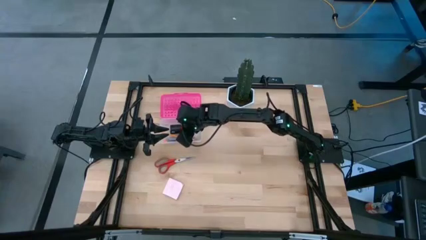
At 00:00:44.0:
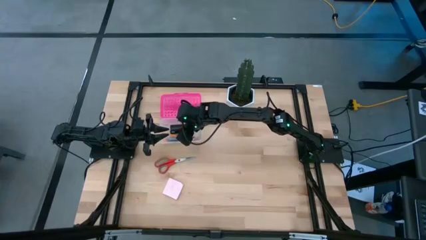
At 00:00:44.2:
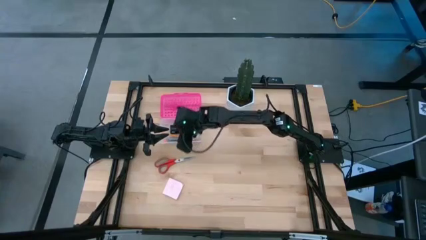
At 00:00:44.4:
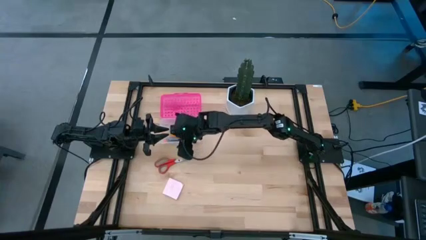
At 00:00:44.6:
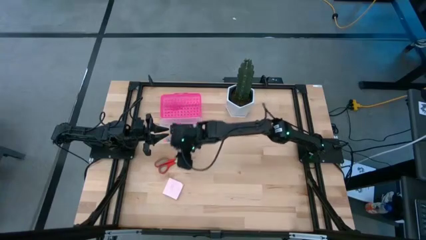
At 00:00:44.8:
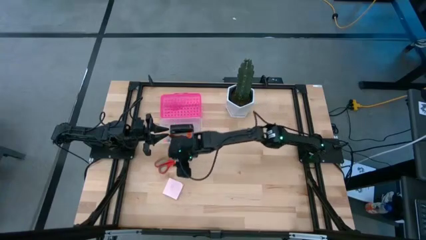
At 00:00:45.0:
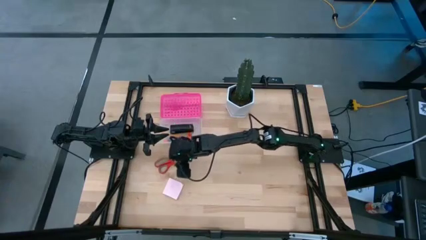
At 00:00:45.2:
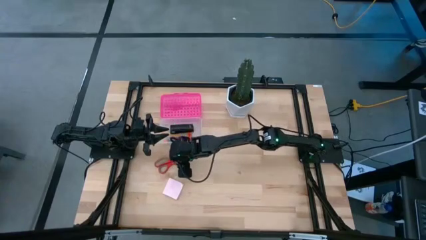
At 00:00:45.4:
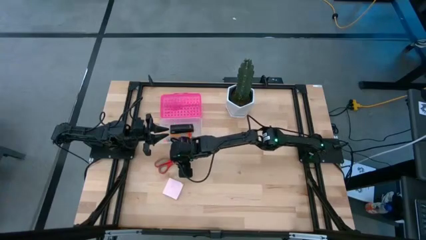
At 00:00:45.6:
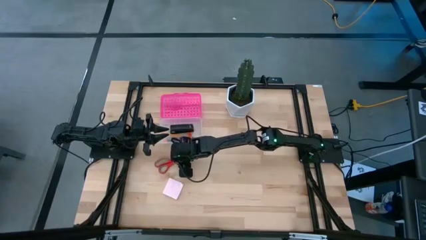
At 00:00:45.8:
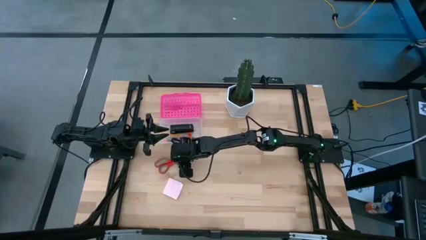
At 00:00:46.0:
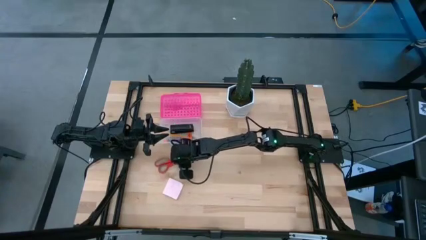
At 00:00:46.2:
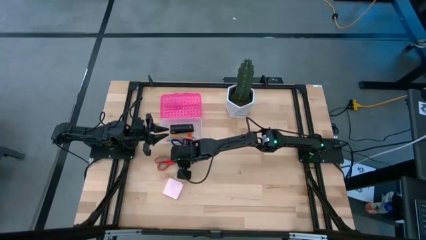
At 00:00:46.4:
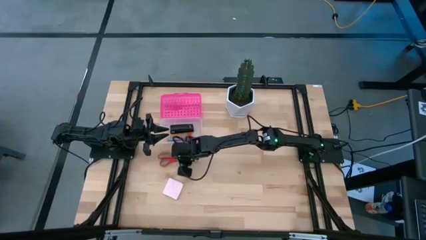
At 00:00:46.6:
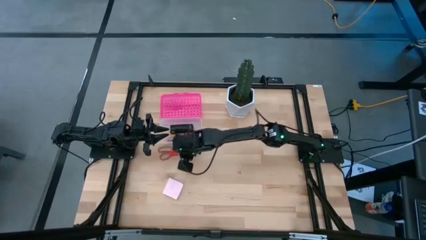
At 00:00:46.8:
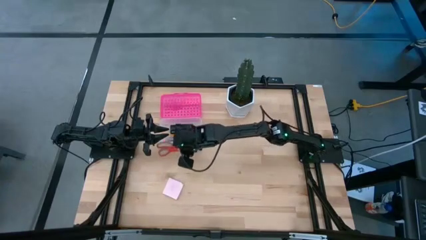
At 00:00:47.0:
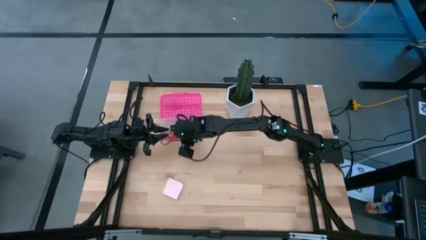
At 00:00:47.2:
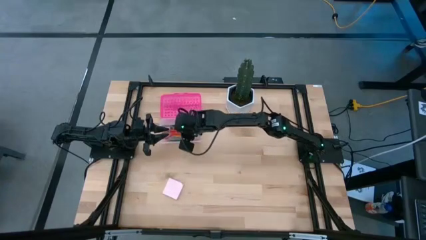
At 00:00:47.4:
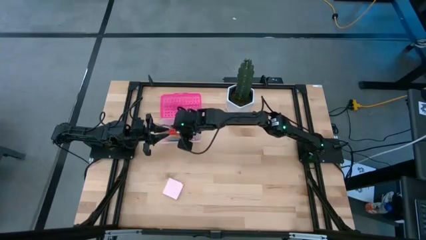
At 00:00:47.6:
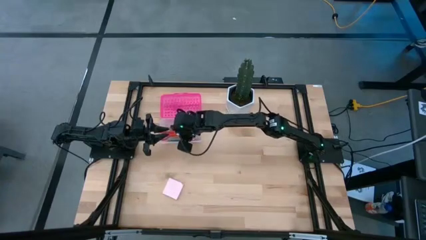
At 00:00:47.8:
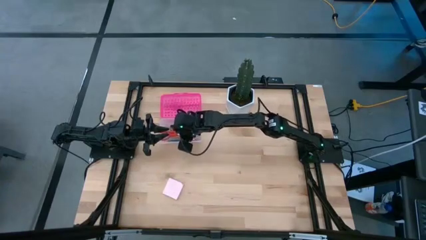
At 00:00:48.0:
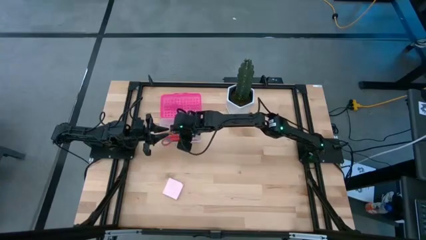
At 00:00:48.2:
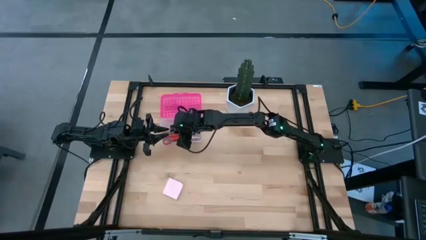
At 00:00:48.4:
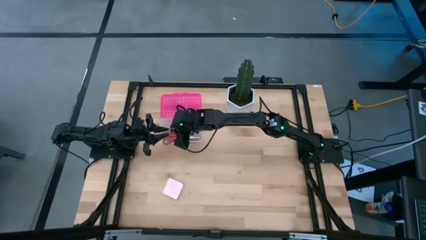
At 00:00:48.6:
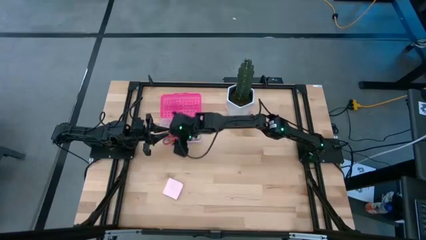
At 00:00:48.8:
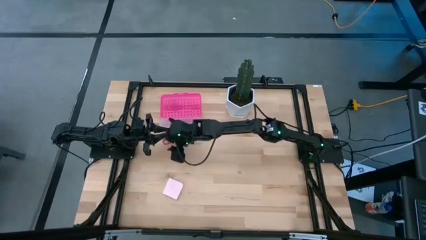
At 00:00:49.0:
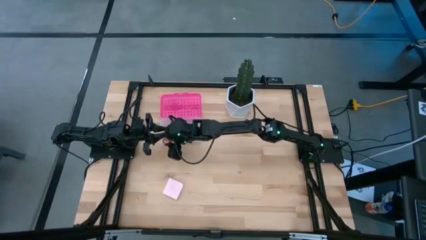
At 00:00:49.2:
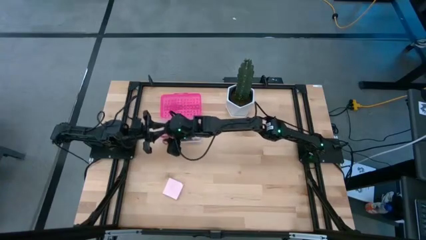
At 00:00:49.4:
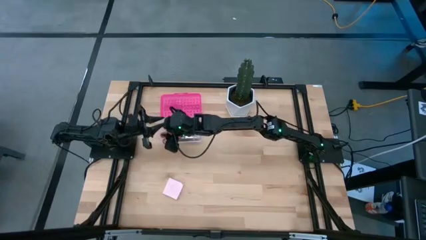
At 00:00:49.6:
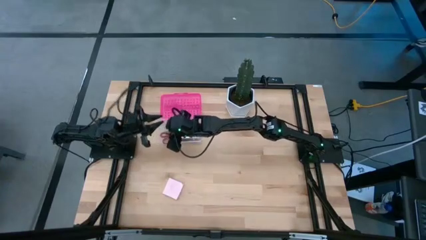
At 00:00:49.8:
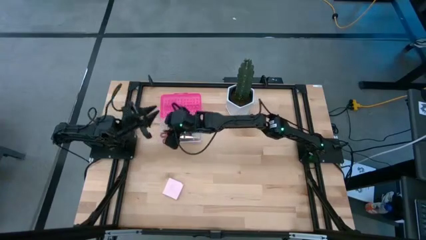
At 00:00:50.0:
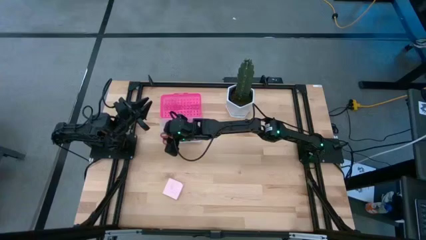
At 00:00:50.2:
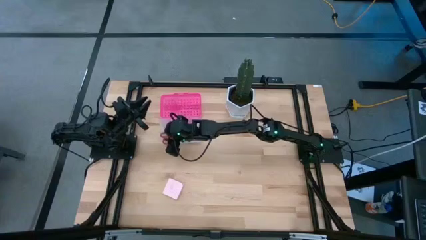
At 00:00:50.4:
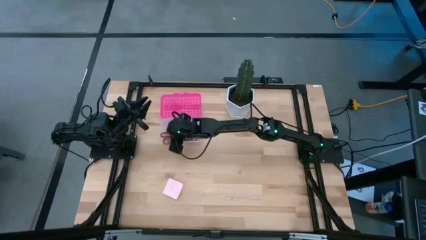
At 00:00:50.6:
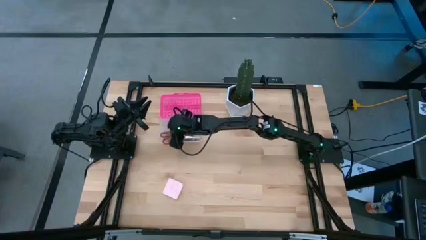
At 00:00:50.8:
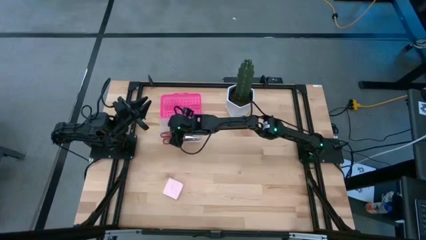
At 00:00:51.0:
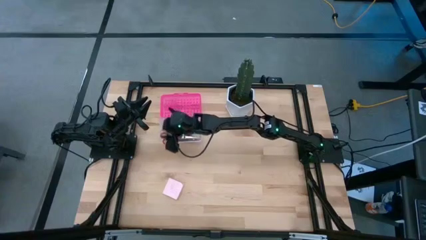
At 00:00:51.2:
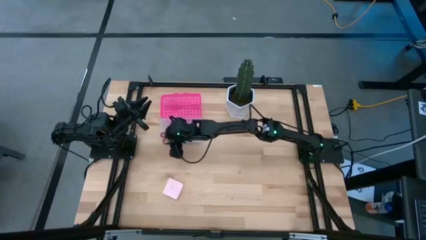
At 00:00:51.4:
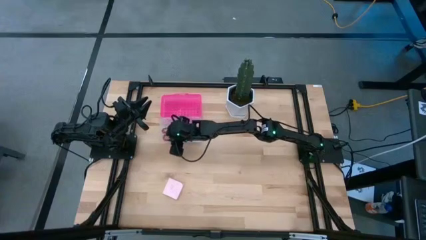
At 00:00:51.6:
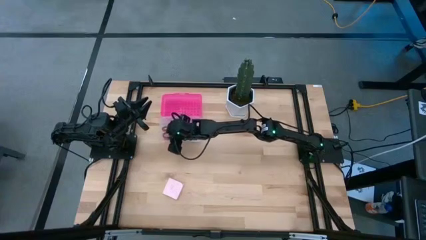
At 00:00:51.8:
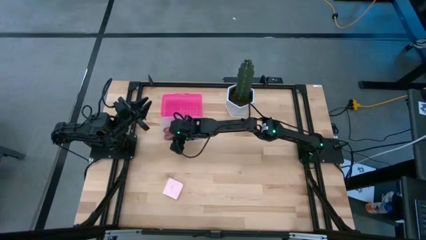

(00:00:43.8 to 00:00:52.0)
Task: Pack school essentials
Put the orange scissor into the supply box

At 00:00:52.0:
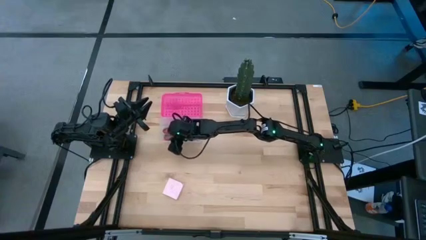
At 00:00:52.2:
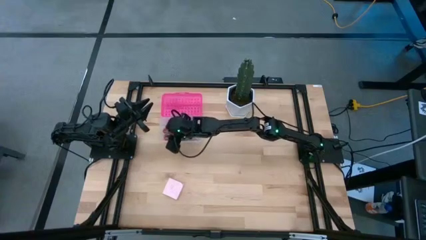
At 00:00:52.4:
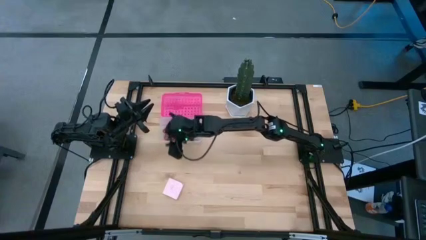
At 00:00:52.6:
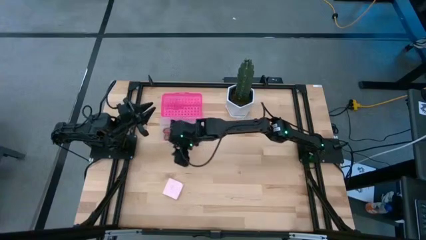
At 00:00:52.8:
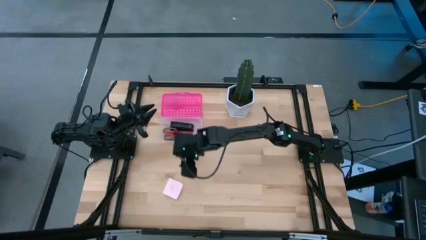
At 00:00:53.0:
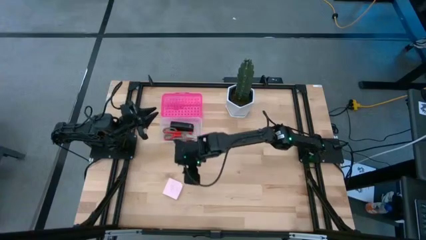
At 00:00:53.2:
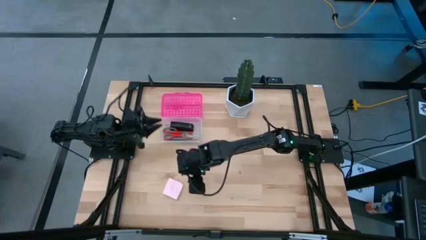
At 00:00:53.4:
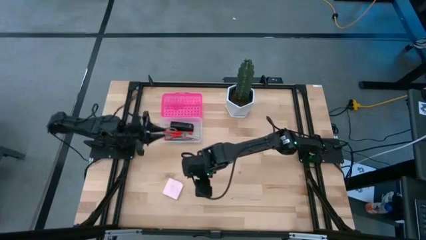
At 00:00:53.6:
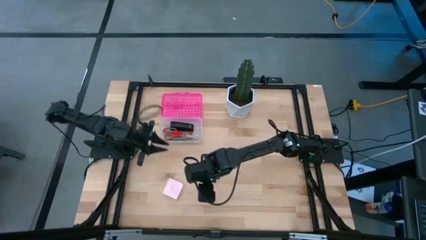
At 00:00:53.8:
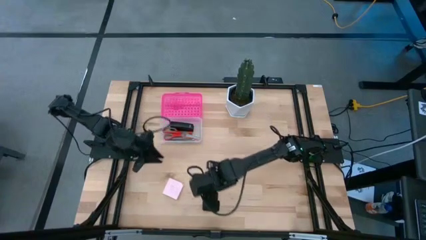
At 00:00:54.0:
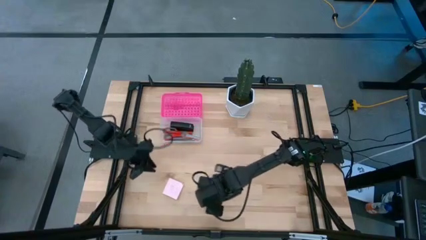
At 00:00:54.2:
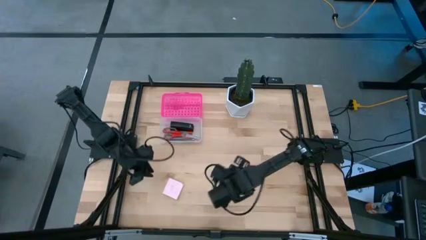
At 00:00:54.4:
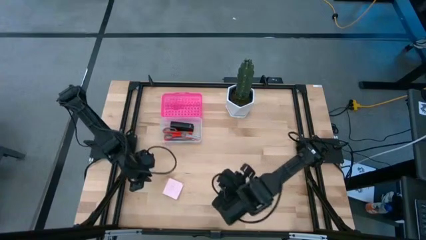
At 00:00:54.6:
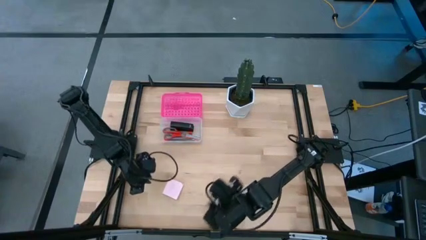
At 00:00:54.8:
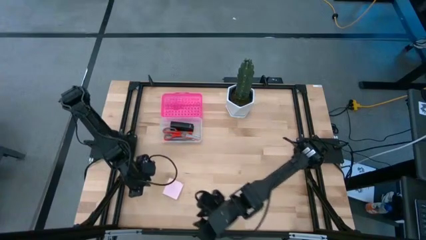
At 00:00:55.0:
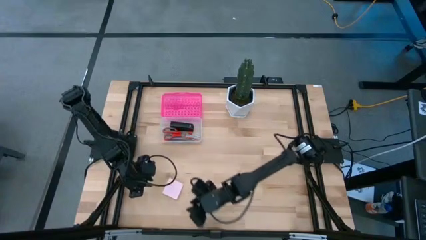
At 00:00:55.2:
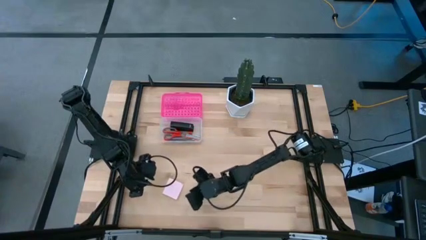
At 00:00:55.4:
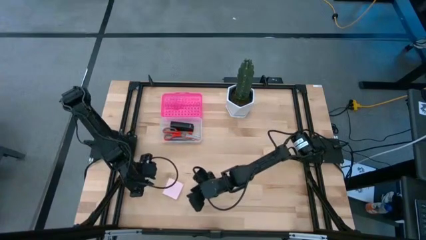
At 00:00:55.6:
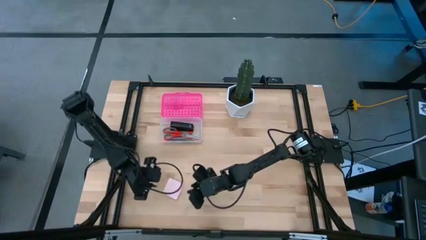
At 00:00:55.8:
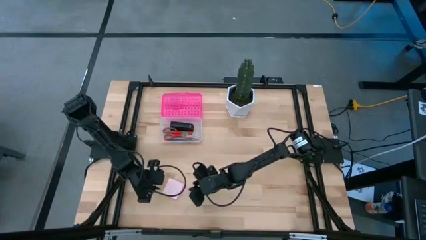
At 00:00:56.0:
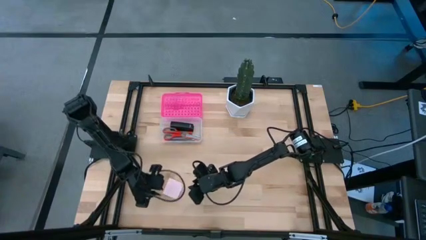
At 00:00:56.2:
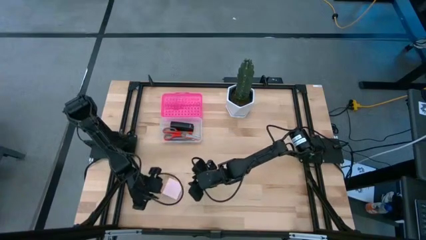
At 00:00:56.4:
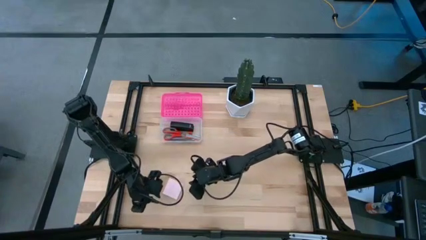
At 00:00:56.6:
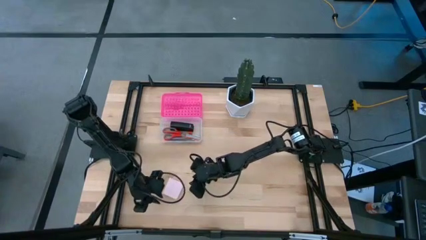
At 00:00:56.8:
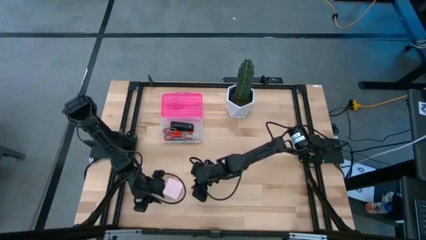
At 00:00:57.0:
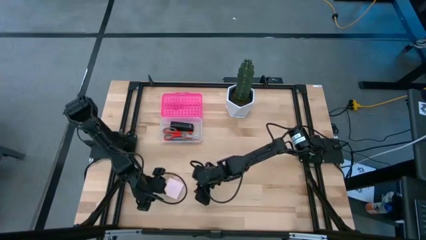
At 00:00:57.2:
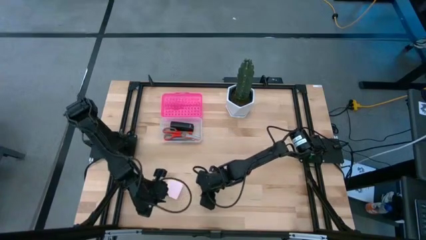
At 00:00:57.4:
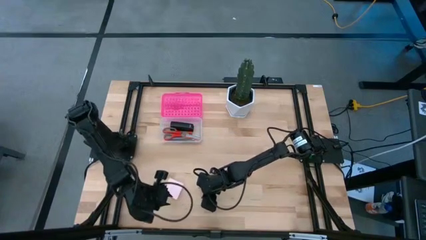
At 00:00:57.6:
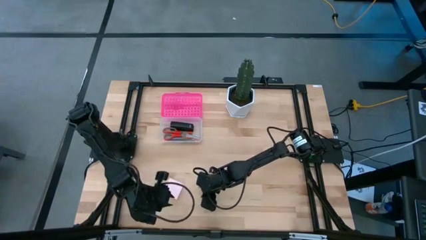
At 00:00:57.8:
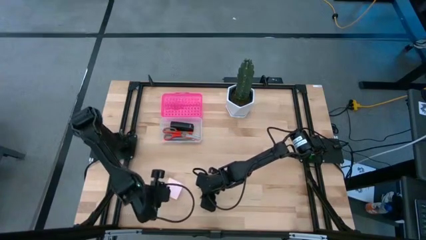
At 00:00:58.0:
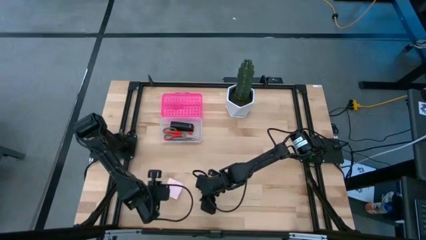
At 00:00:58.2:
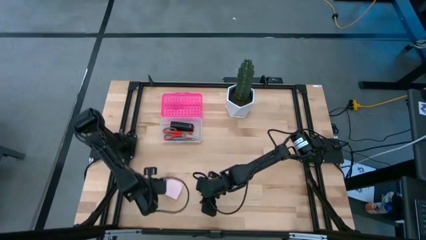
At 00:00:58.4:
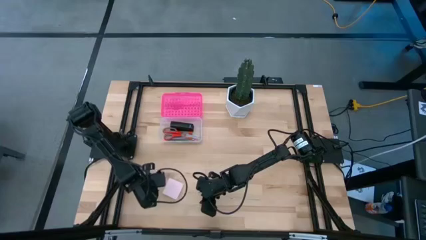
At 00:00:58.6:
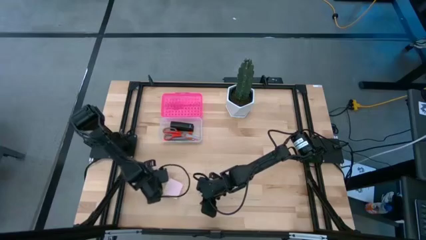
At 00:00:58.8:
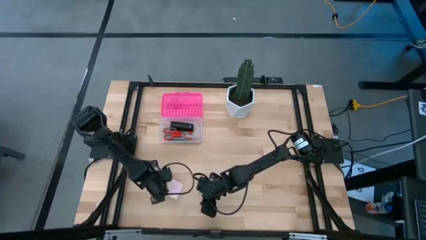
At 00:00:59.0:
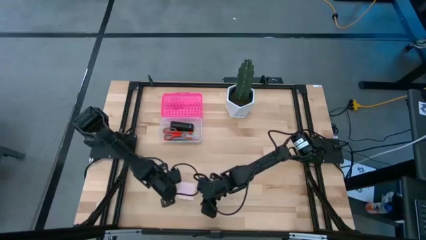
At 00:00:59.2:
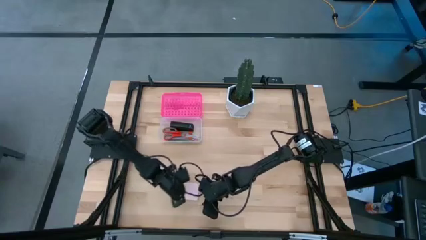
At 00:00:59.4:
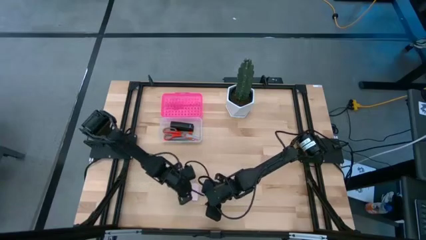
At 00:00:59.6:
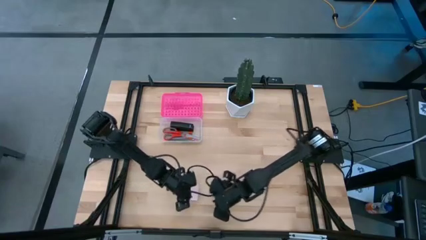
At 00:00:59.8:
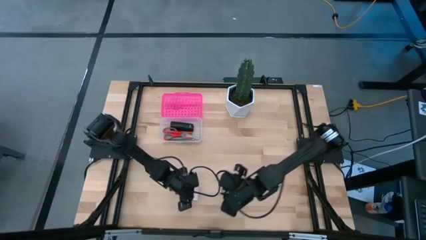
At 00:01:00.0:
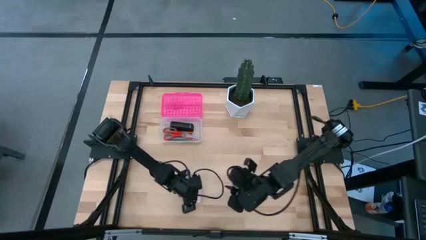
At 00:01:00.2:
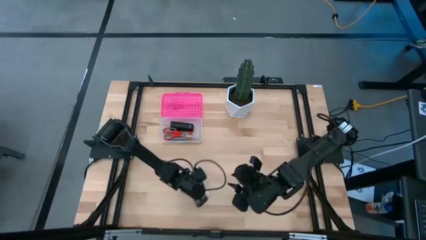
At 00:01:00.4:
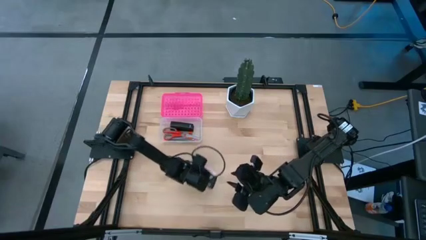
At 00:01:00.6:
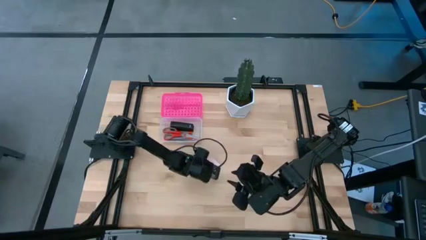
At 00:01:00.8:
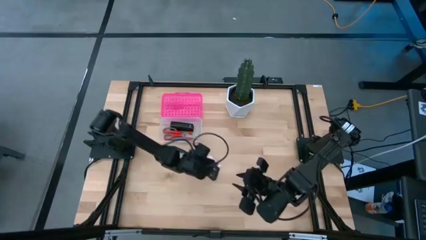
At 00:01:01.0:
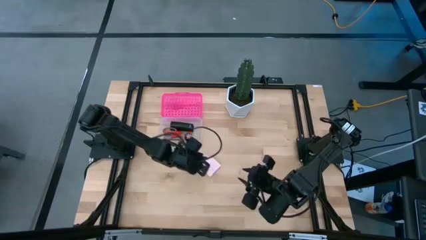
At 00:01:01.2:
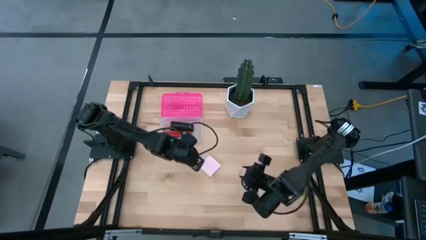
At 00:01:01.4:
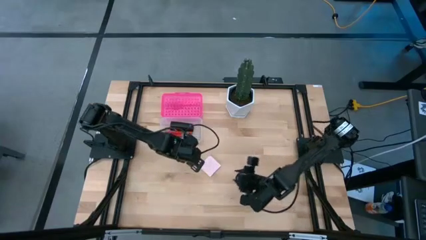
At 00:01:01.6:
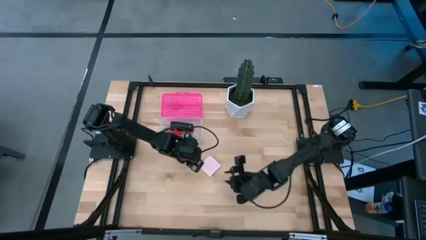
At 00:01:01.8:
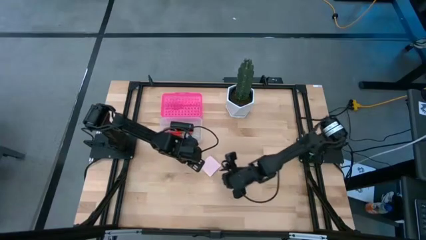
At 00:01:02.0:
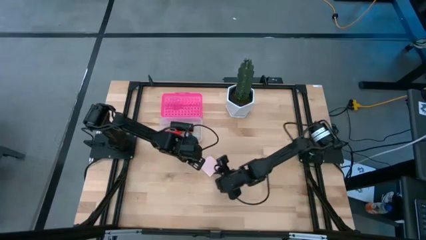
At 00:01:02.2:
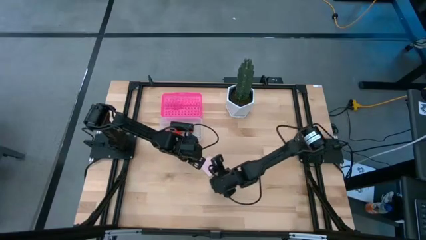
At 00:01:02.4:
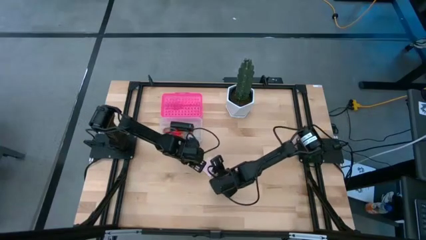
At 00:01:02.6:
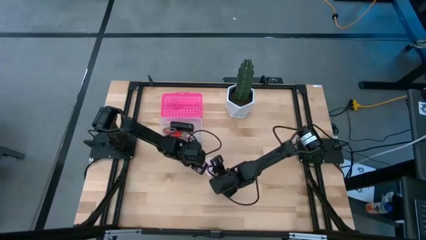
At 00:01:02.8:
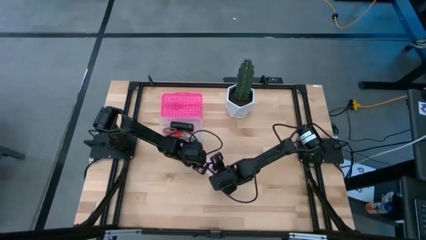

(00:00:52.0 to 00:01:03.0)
Put the pink sticky note into the supply box
